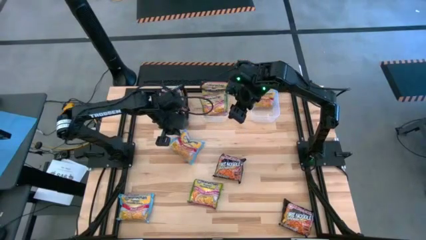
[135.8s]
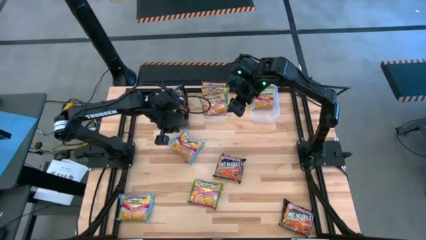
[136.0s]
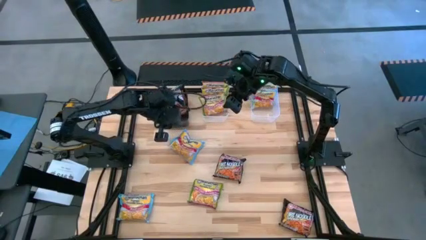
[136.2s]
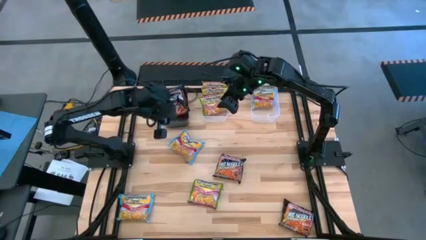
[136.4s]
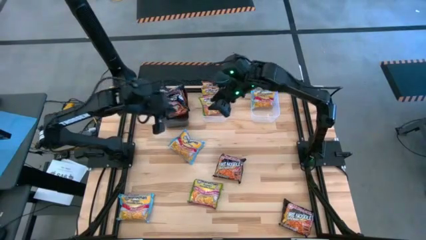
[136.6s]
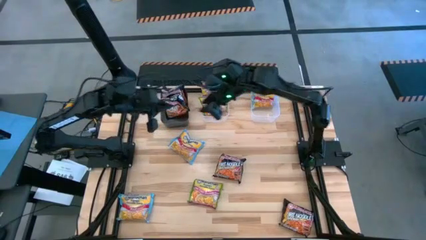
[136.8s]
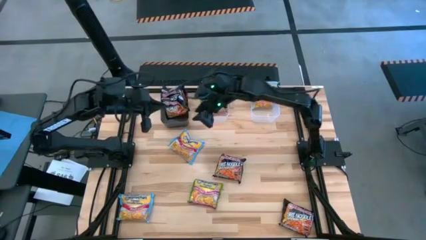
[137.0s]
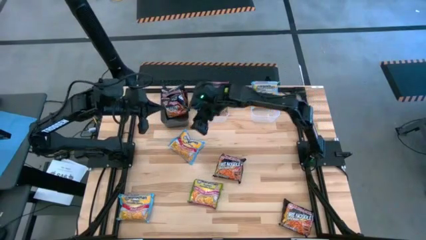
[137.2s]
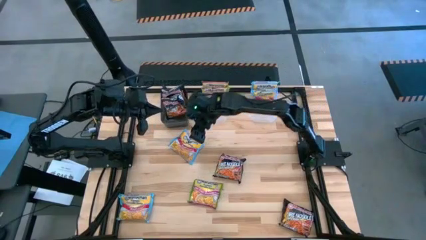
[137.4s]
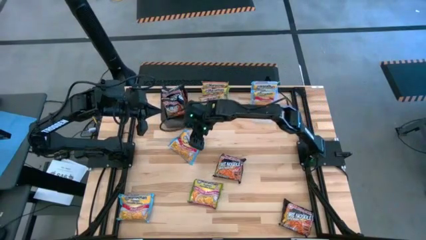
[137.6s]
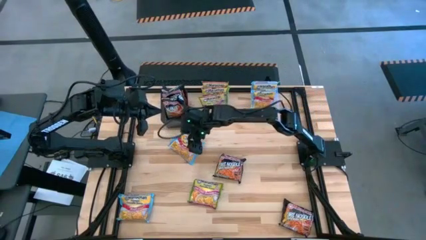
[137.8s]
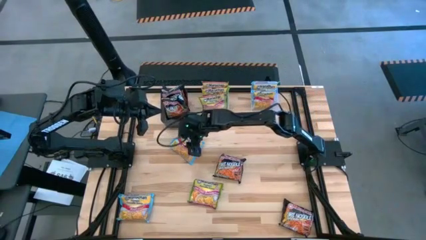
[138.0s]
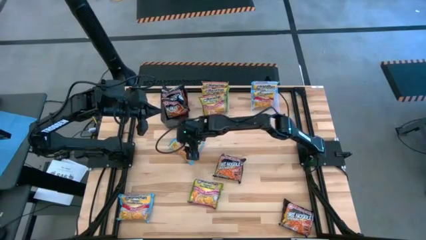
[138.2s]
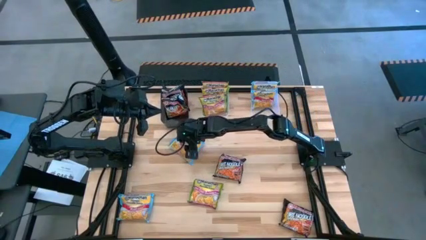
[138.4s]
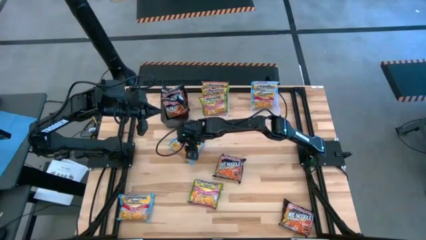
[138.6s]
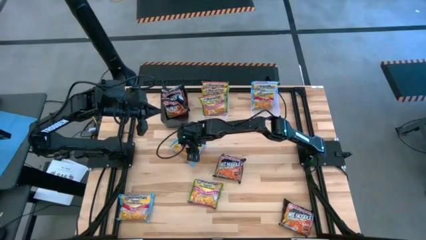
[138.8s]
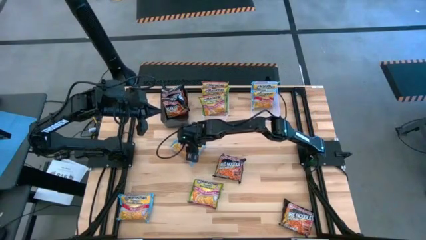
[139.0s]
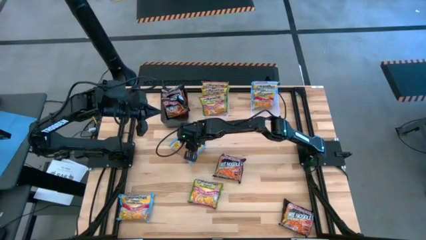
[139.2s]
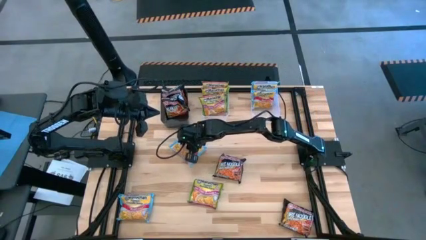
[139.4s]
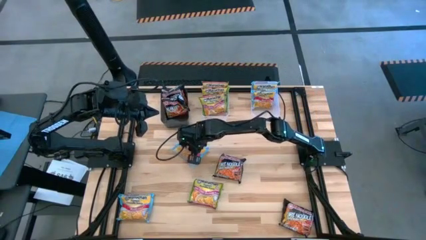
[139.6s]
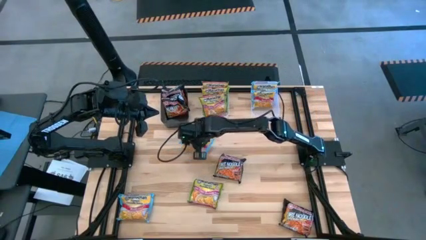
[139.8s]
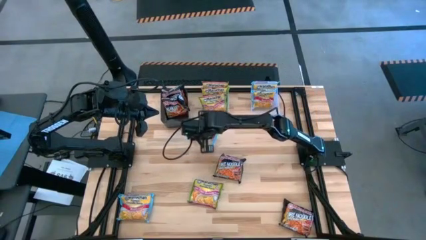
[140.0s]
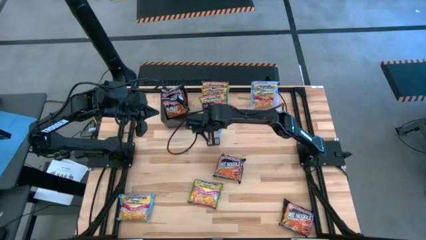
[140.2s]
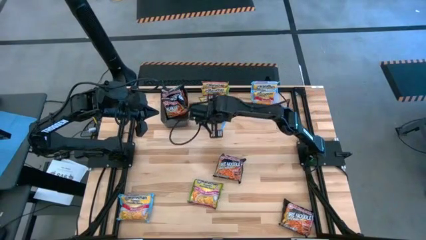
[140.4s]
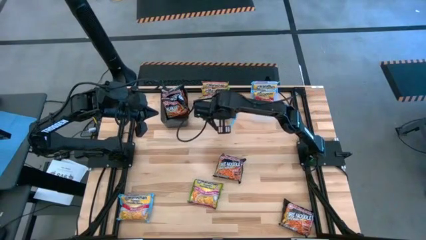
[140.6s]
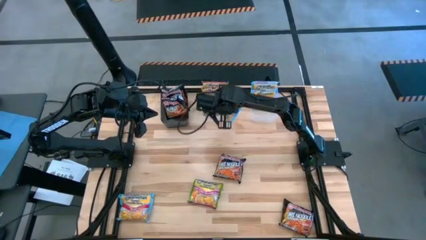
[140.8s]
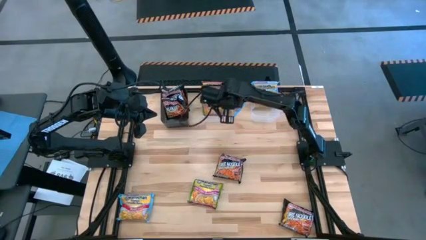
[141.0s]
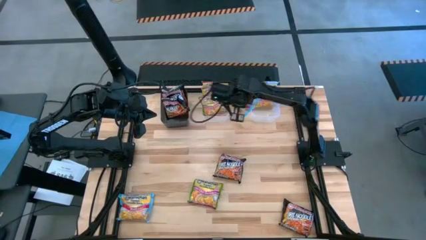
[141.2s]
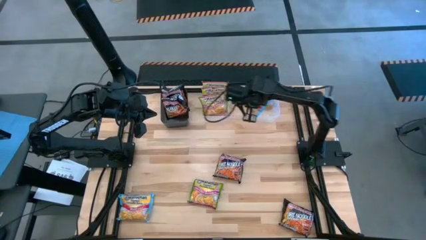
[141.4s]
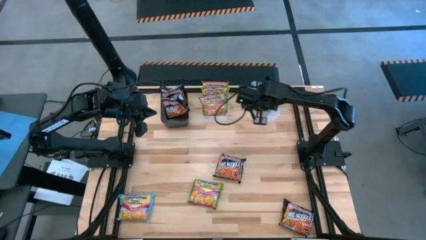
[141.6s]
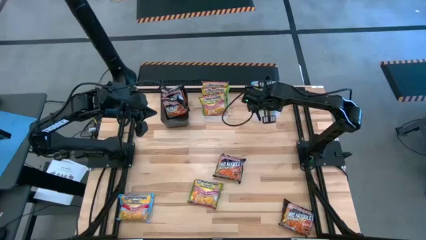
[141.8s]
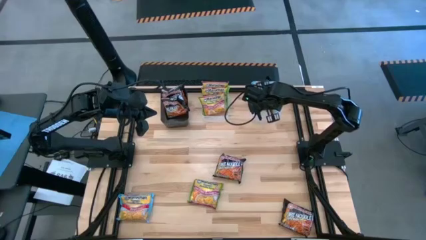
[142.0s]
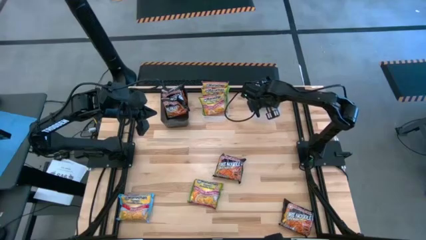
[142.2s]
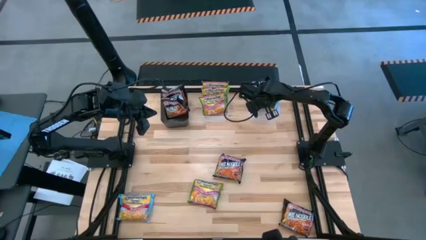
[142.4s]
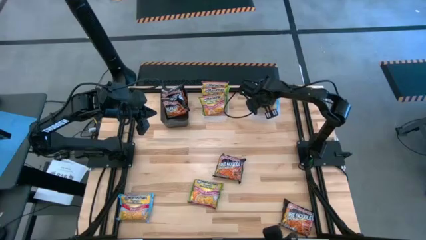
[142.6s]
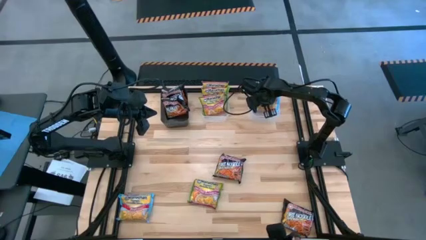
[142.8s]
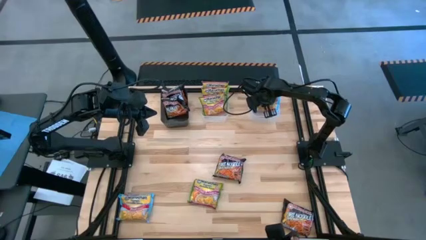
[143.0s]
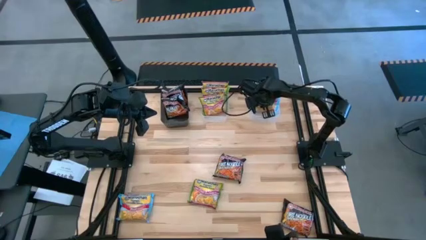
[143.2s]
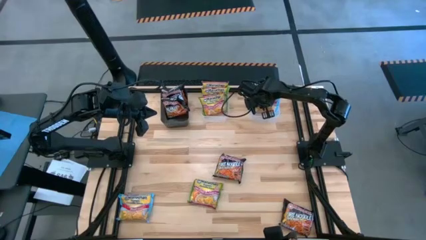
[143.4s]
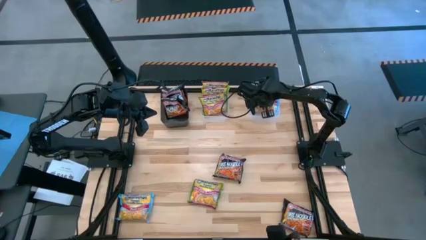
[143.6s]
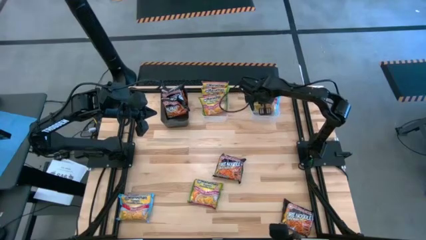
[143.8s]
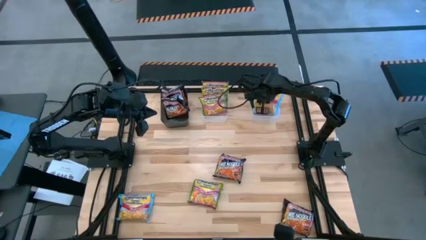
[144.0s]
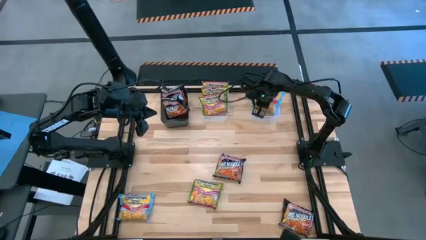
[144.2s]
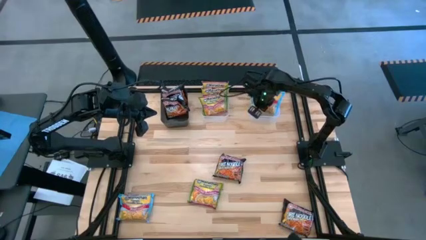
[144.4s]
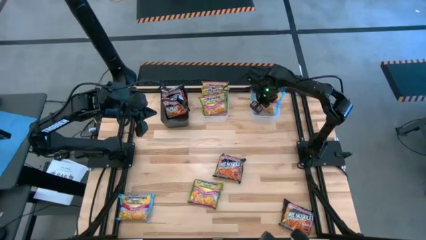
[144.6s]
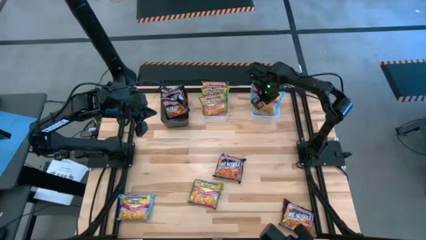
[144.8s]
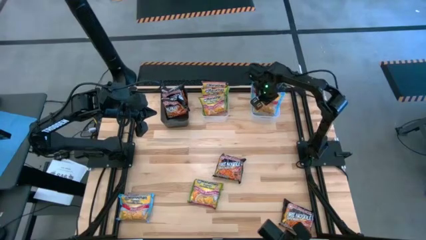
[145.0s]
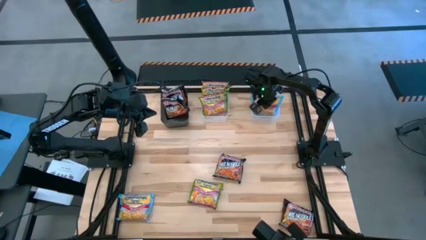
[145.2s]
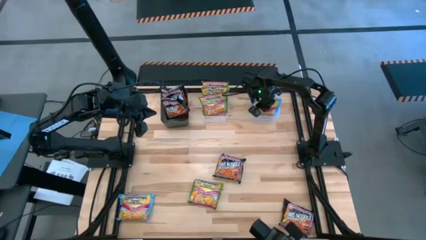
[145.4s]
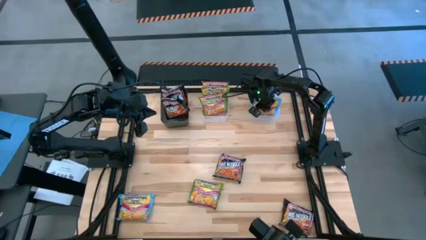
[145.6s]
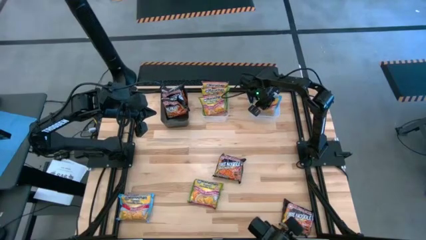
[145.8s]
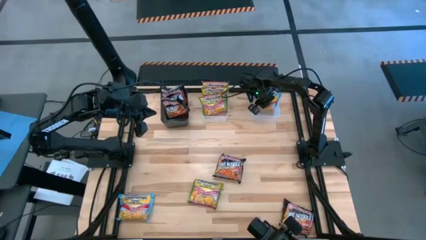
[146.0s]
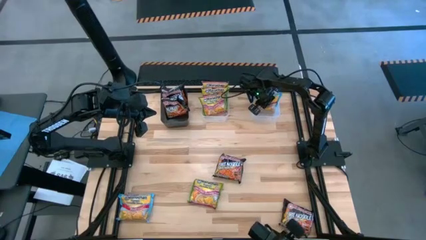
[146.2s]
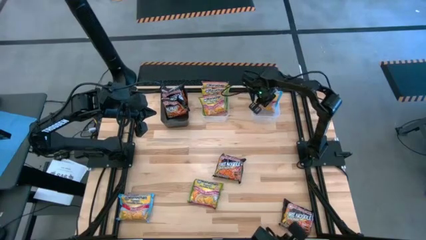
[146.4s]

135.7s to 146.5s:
Task: Sort Maruchan noodles
Put the blue noodle pack into the right transparent bin

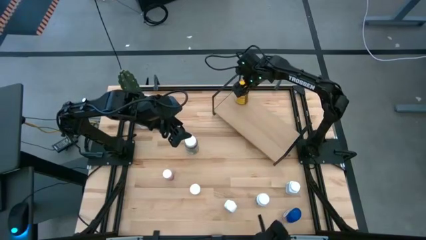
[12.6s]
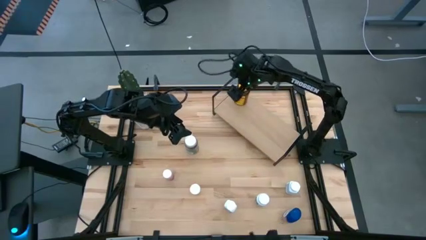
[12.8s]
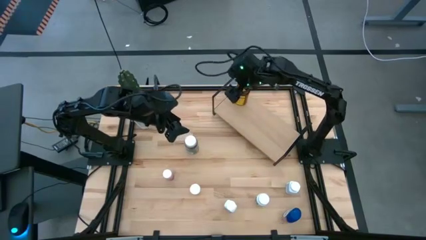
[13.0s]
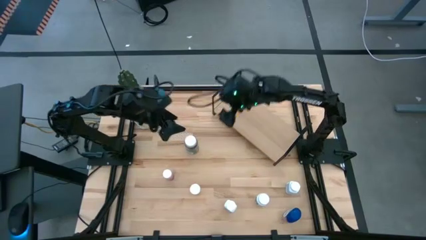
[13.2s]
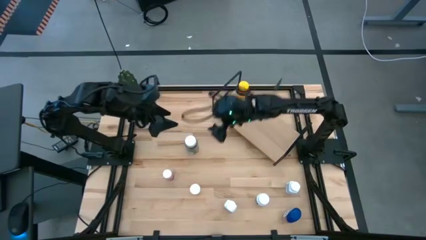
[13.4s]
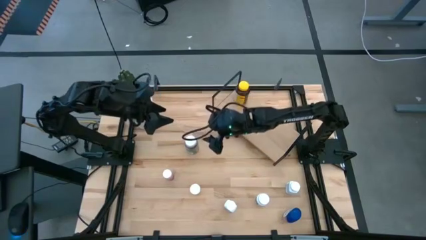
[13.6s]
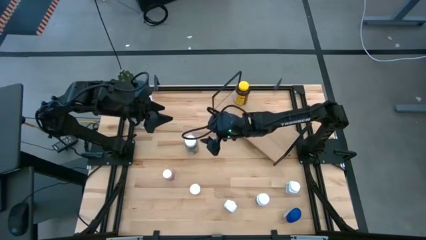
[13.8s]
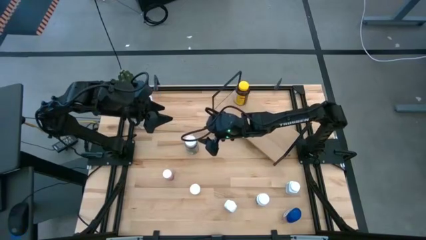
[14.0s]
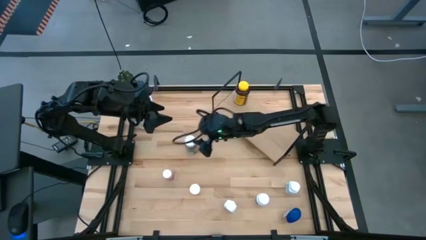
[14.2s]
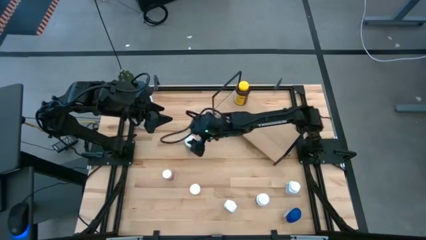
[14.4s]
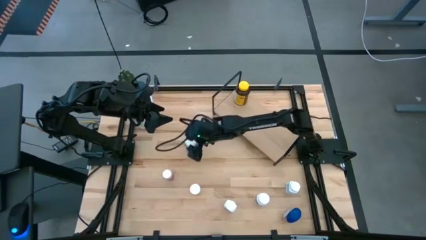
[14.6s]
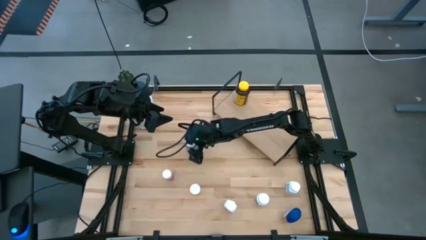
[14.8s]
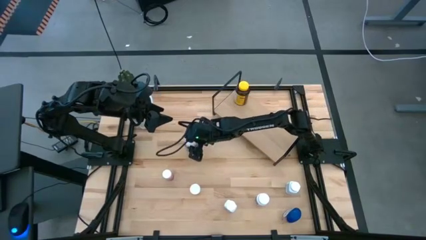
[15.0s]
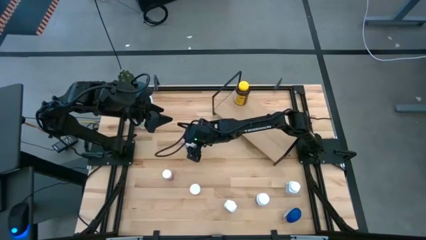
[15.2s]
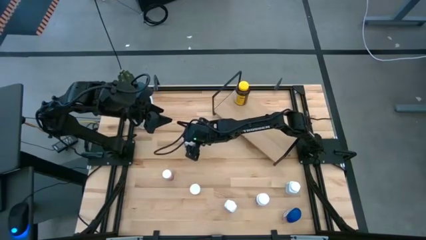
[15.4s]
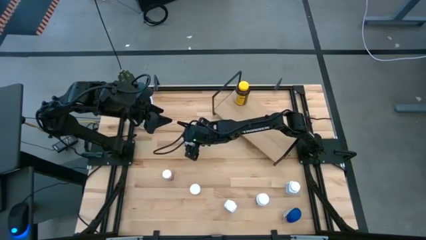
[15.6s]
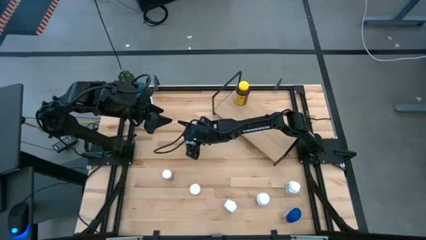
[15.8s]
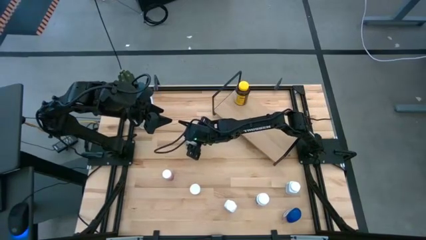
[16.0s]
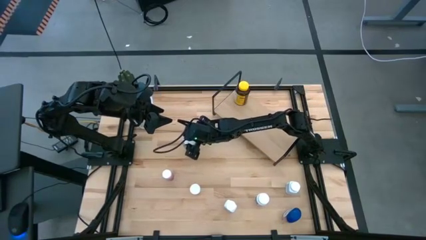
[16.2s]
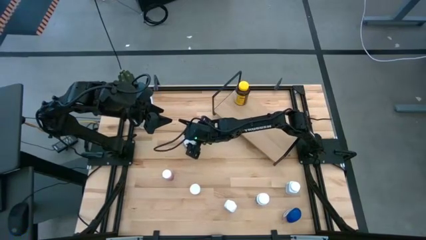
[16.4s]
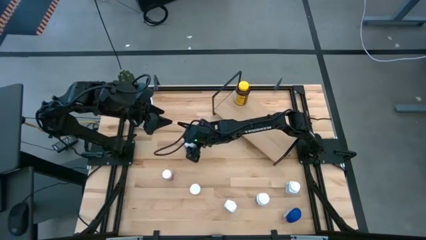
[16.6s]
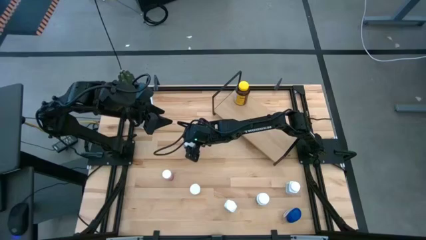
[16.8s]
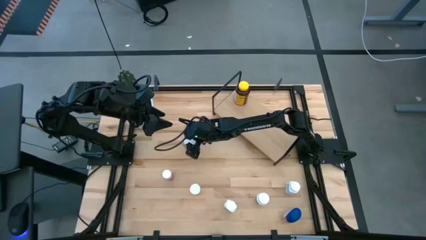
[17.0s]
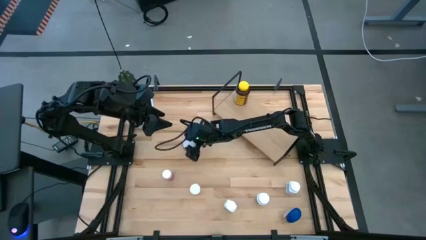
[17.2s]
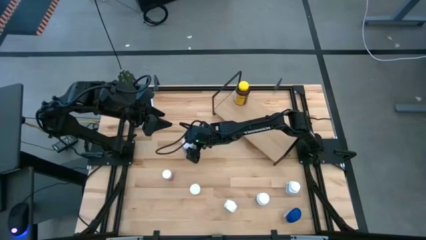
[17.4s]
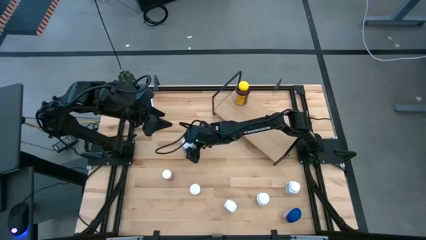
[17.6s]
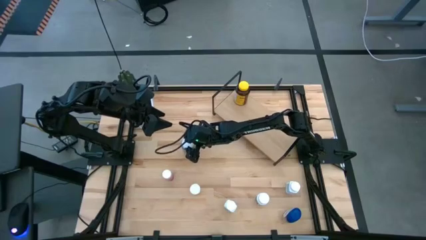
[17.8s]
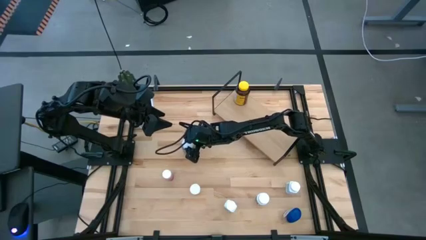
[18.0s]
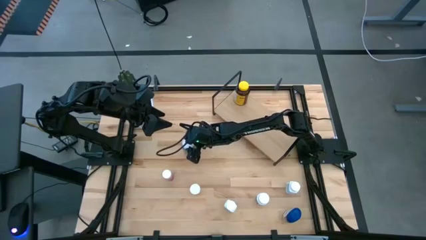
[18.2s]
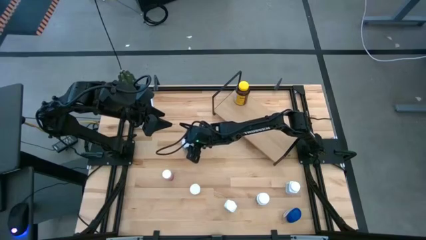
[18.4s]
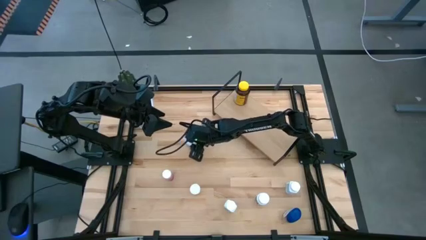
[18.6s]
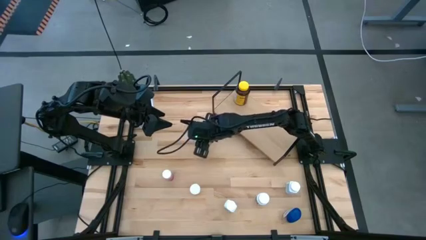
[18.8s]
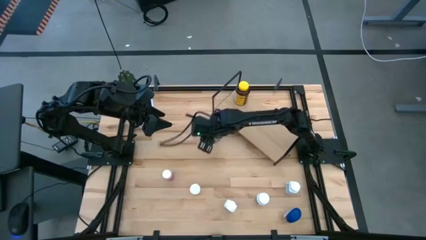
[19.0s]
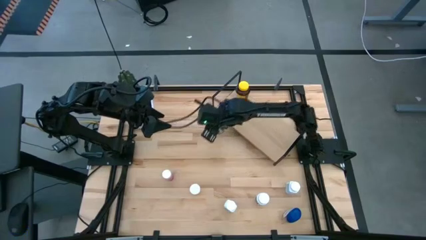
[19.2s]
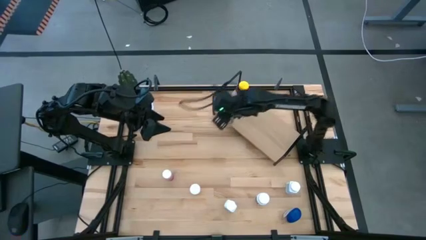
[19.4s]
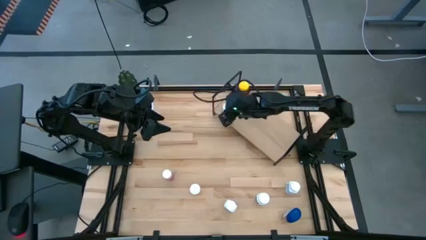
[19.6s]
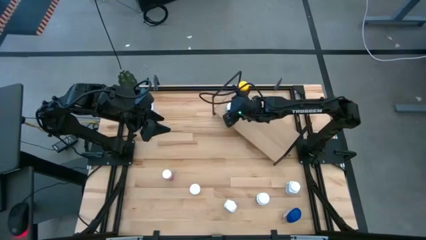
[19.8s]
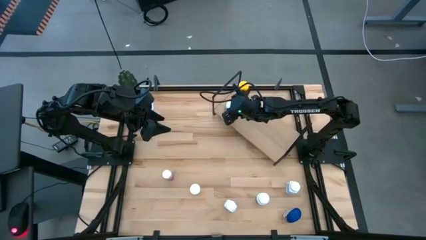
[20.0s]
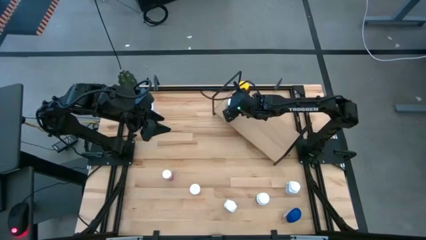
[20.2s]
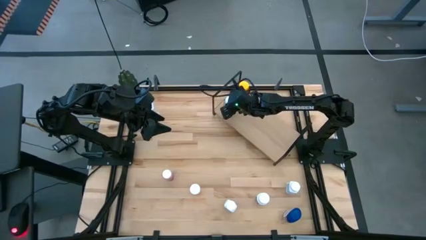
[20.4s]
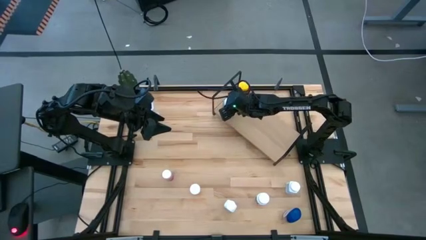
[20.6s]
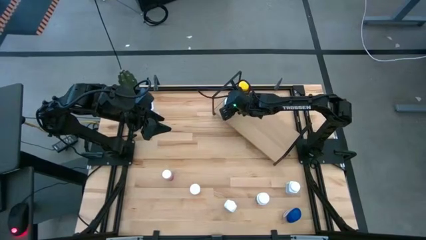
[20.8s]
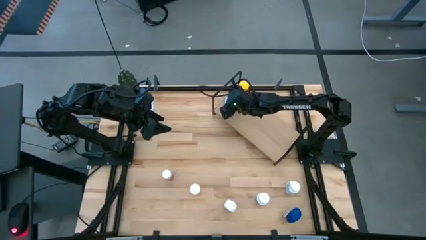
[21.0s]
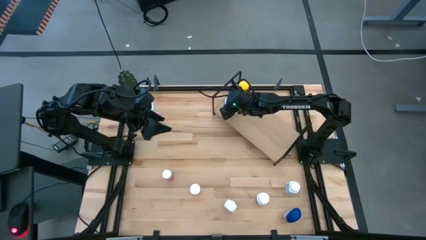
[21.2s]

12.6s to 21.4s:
Task: Pick and place medicine bottles onto shelf by color
Put the green medicine bottle on the shelf
